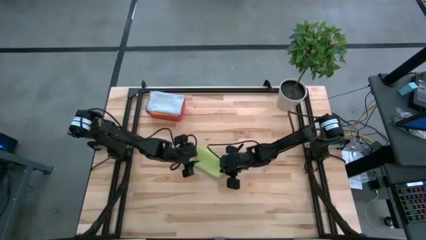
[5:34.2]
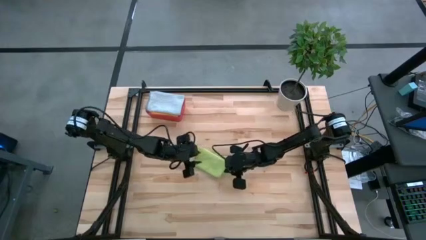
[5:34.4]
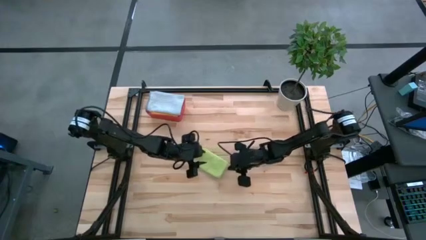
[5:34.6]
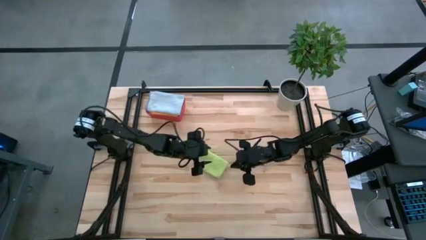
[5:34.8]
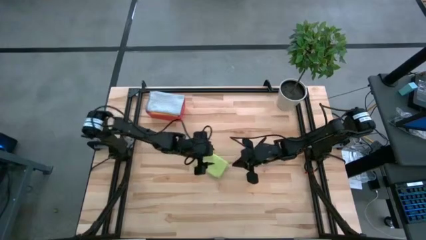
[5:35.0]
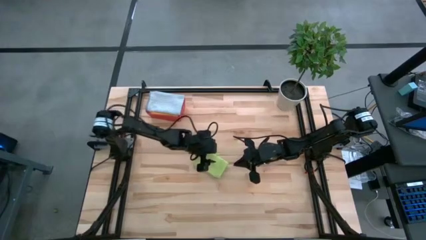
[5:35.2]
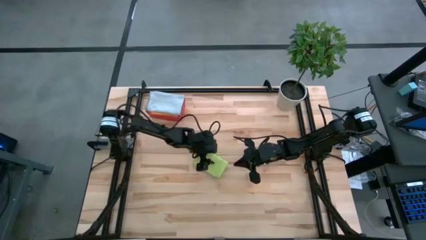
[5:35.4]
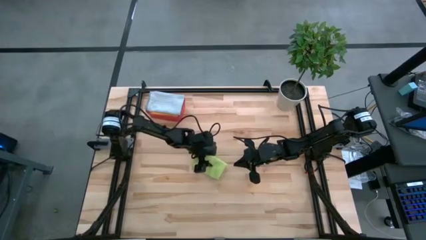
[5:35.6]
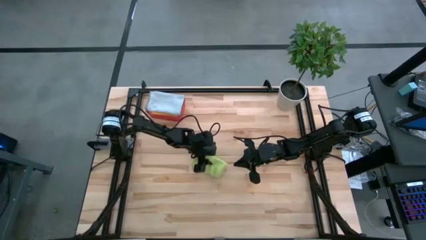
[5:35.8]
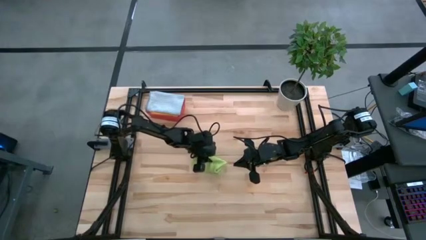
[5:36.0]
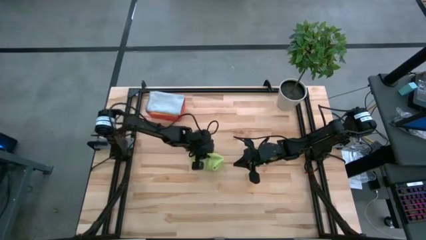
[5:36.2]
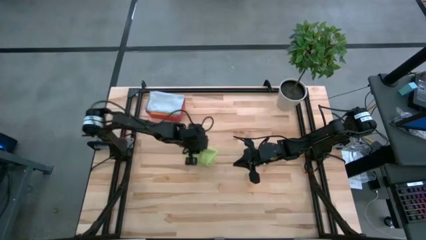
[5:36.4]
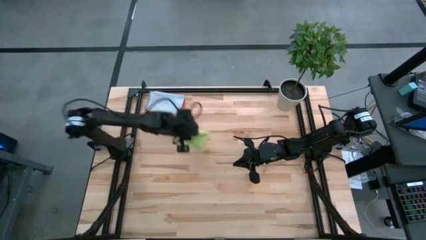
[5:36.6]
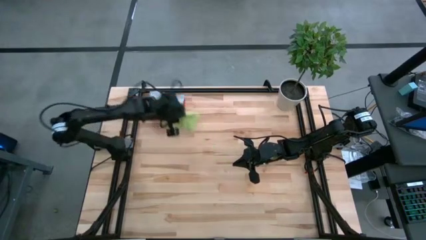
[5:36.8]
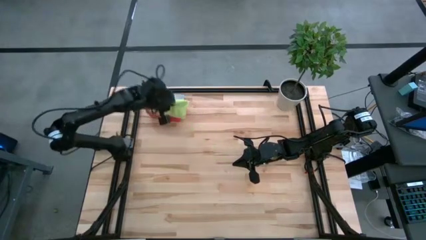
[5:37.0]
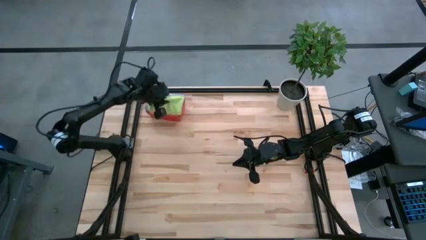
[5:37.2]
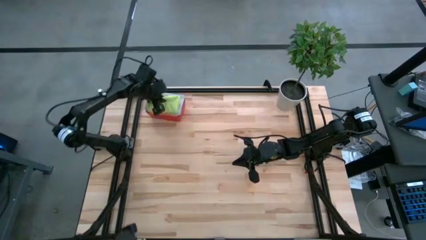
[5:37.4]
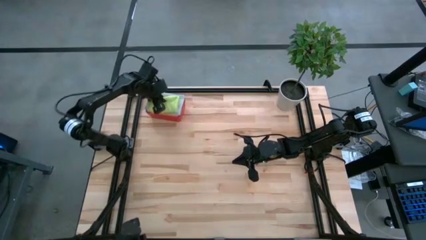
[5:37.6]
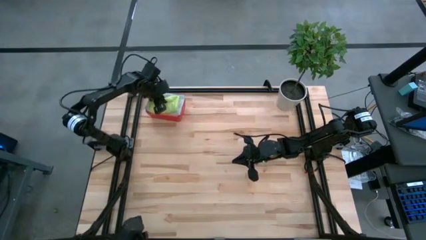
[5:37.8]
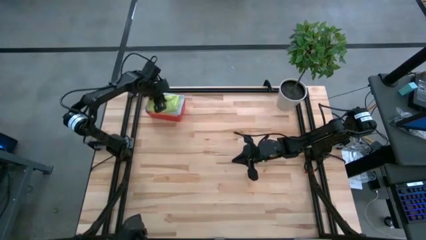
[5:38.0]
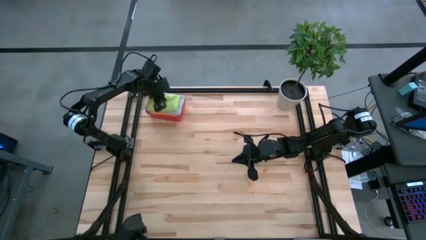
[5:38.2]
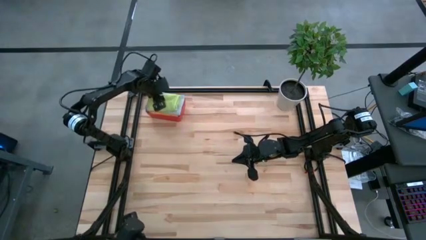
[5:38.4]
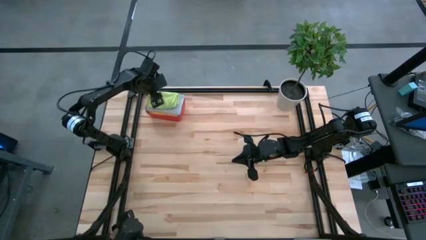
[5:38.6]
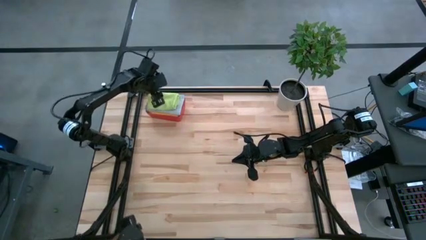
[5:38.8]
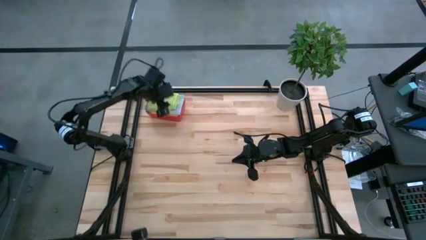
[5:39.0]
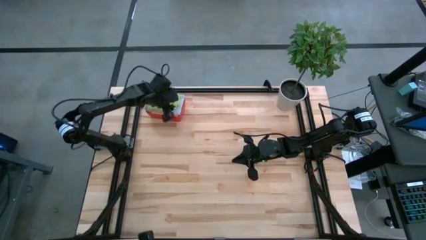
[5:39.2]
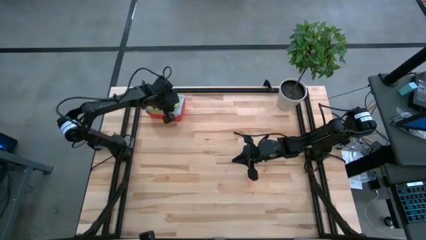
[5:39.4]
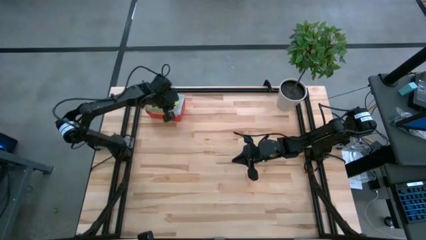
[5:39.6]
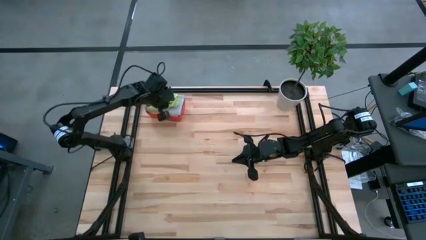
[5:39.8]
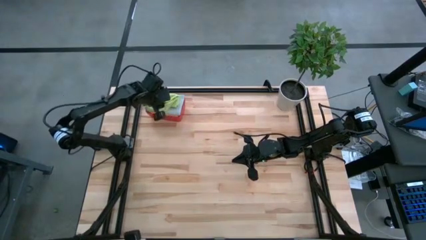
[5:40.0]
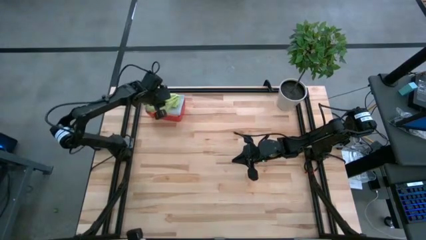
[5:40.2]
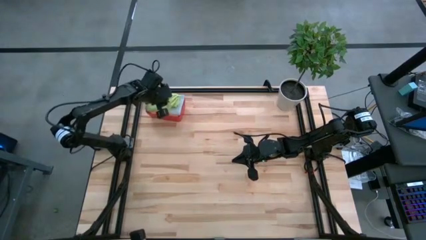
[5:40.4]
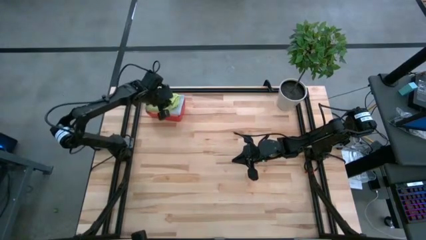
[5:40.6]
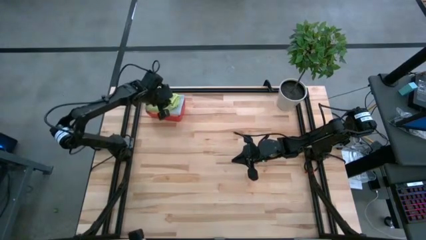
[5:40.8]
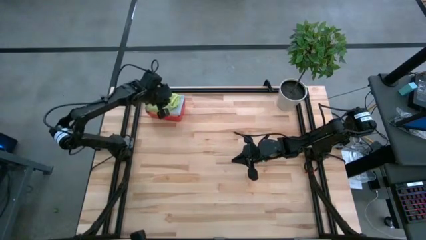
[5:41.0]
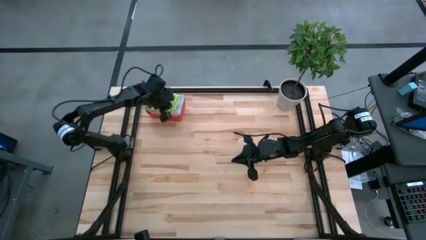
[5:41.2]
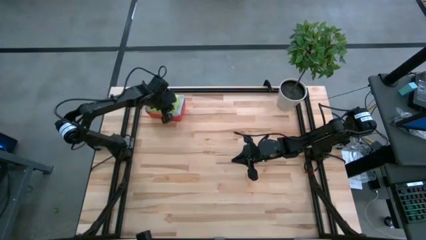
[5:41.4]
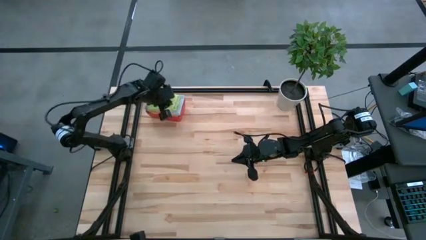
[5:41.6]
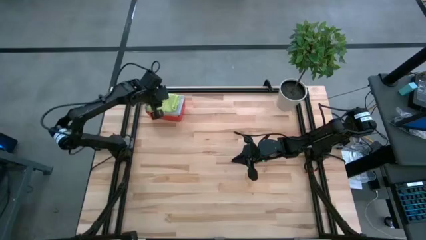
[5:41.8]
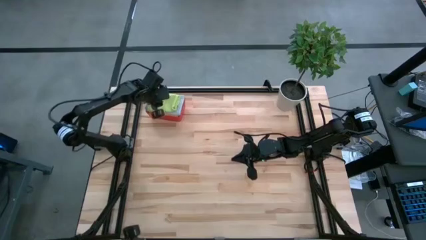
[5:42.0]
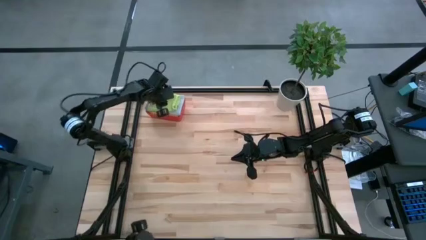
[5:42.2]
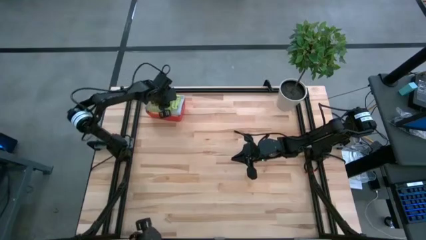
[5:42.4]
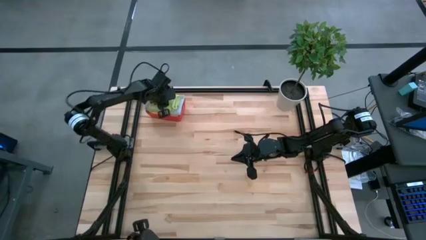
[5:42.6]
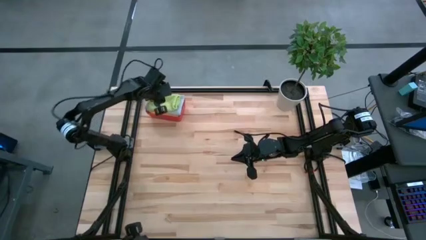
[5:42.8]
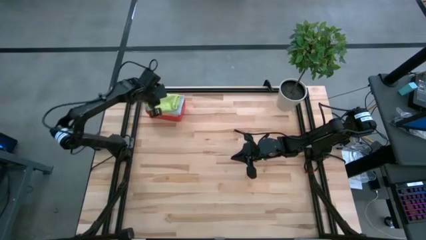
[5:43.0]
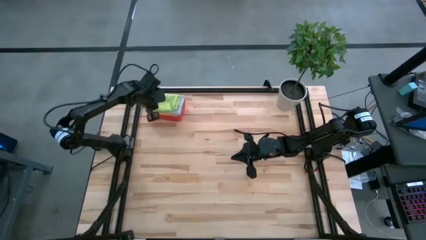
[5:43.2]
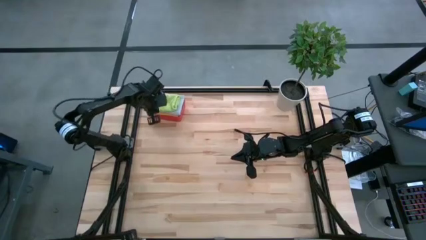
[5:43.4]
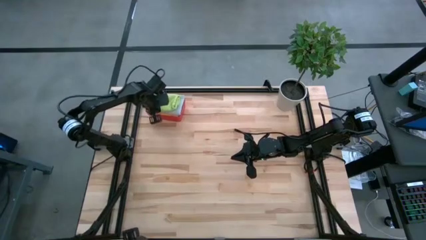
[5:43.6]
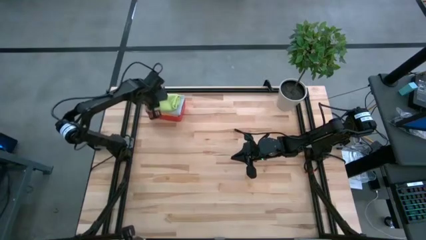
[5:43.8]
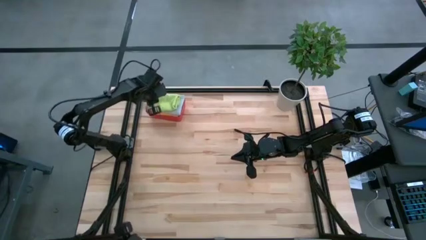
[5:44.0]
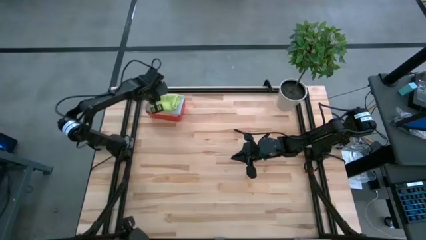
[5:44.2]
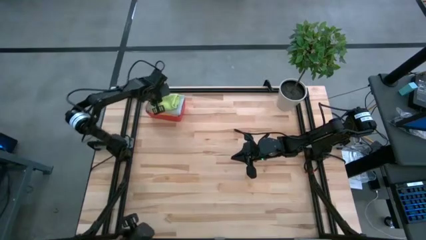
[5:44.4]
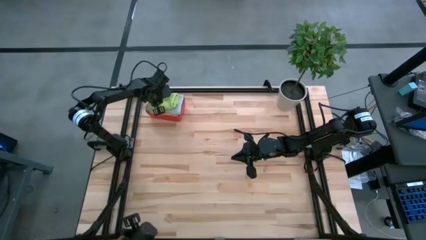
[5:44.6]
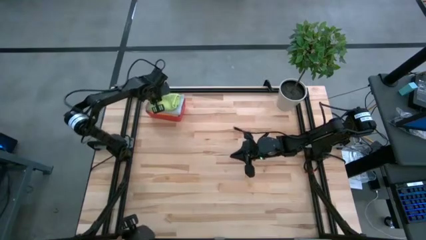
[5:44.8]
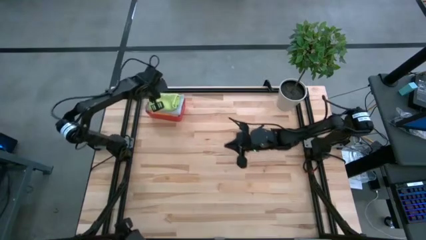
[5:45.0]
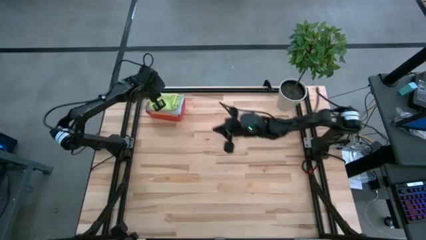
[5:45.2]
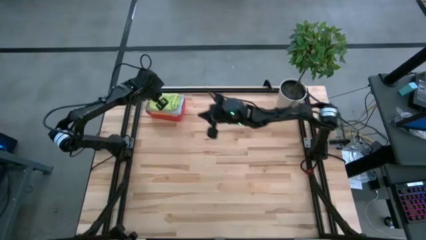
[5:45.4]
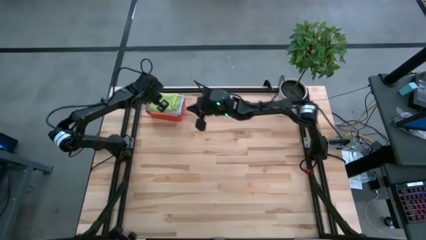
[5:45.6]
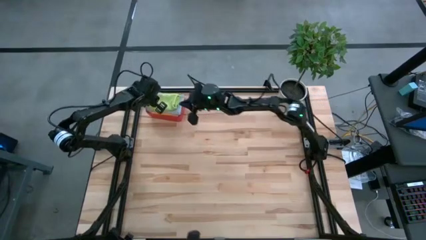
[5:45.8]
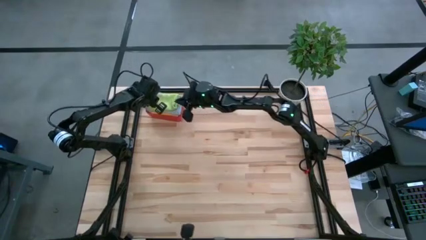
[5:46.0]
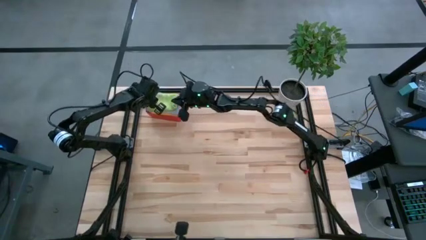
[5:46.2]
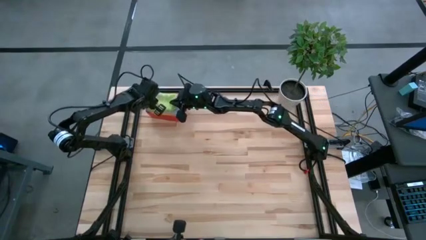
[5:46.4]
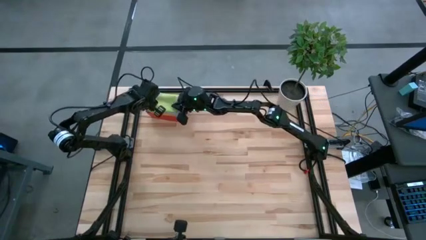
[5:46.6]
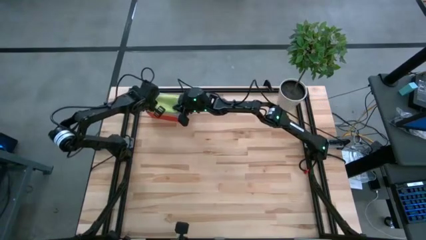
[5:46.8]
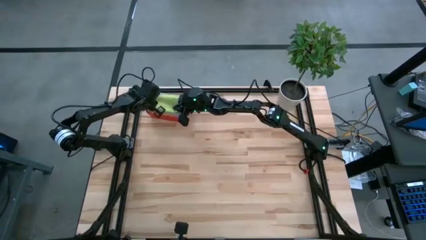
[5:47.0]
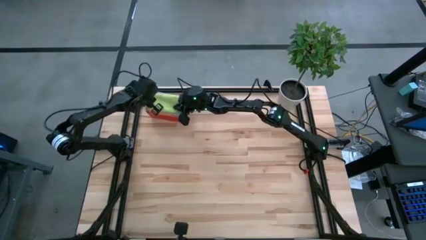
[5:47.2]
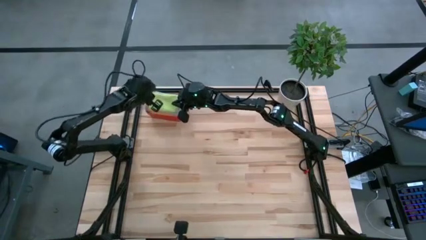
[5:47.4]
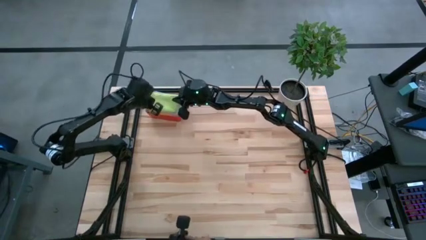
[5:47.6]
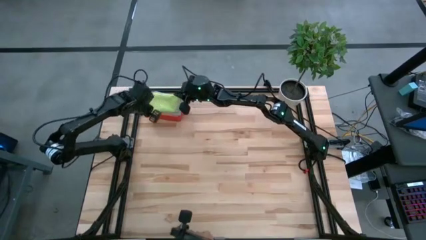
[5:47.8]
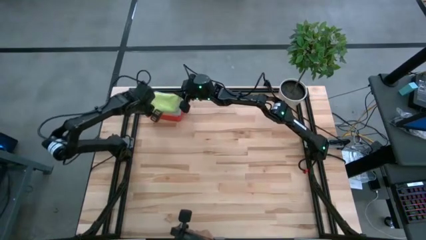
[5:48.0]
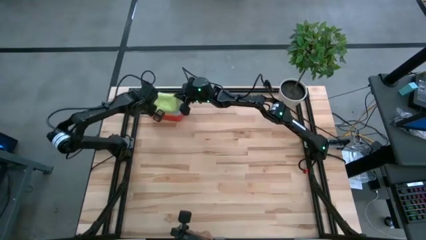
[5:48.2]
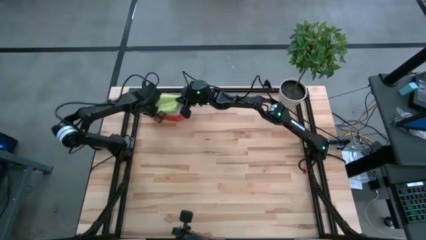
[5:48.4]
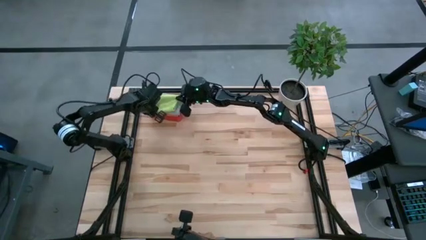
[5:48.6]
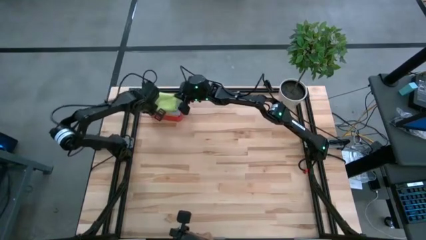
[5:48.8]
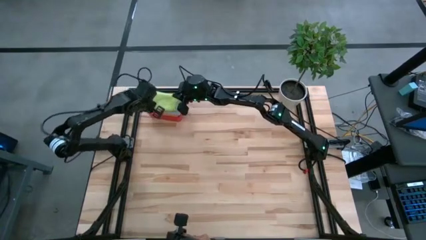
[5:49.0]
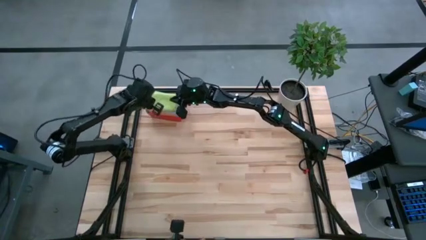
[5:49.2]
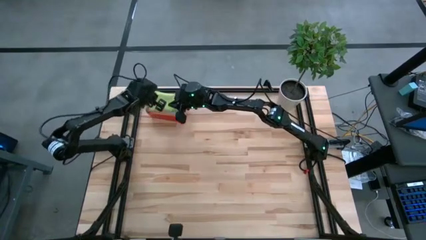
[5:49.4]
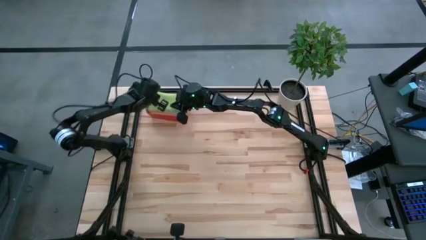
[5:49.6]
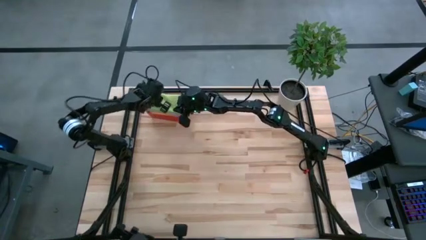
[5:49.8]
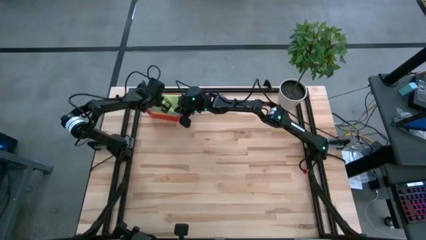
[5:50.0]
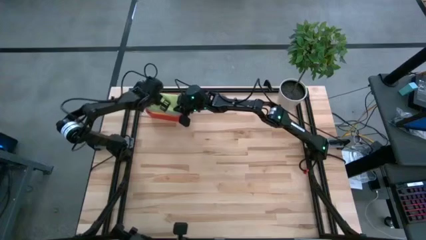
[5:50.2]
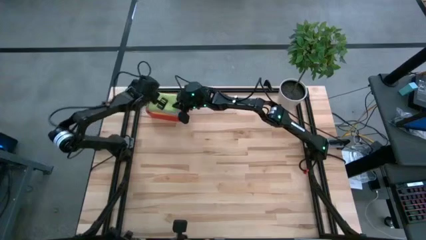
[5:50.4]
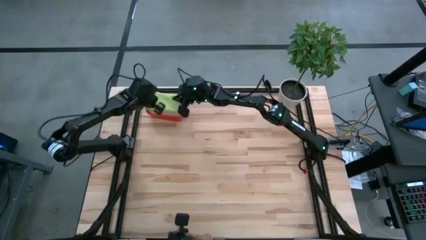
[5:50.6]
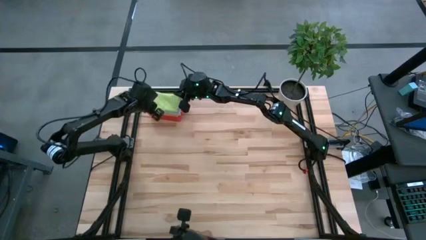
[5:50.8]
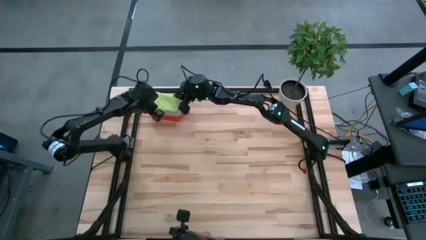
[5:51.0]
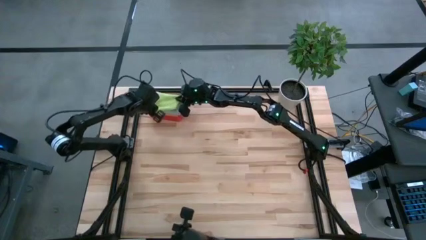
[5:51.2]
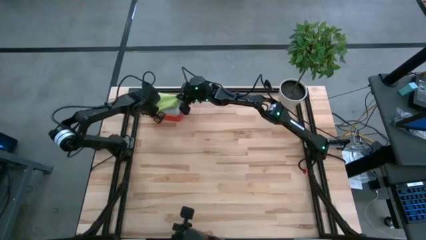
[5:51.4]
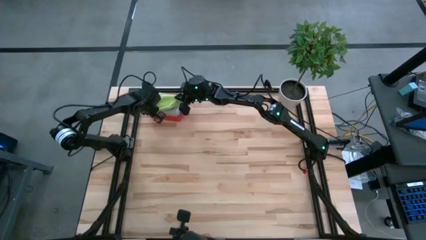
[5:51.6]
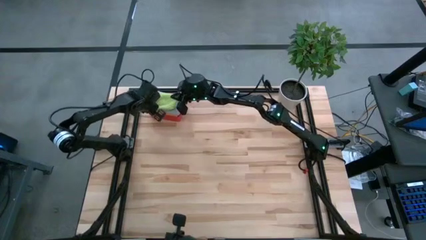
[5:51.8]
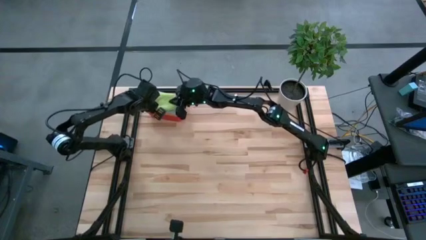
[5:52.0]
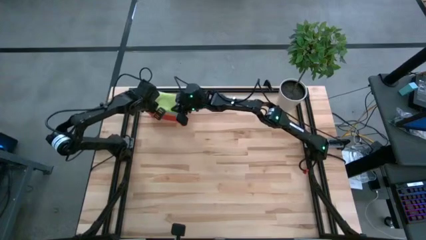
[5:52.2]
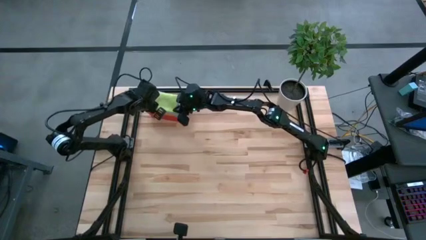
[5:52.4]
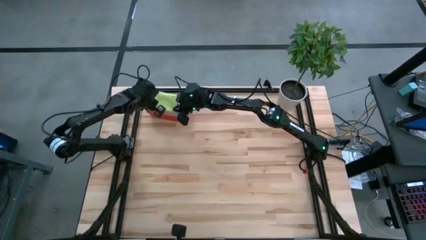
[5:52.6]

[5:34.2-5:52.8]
Task: Fold microfiber towels
Put the folded light green microfiber cloth into the red bin
